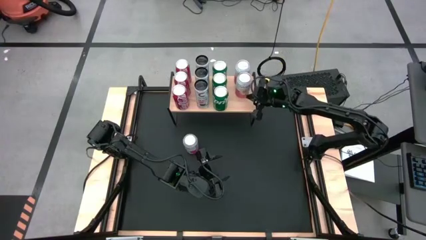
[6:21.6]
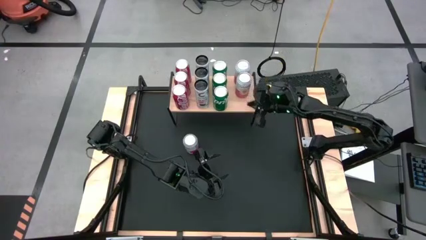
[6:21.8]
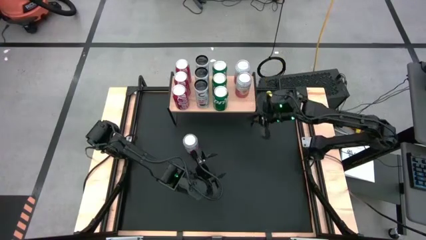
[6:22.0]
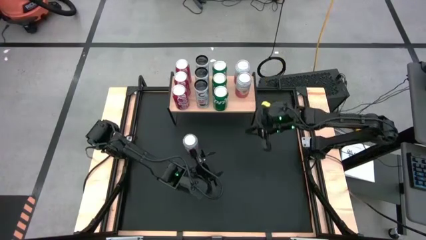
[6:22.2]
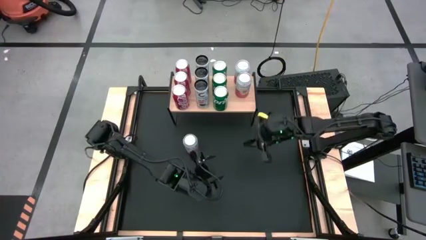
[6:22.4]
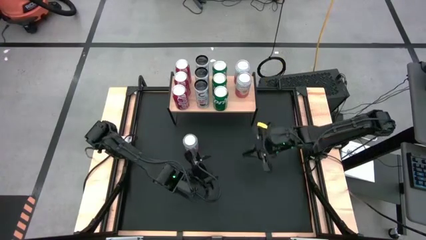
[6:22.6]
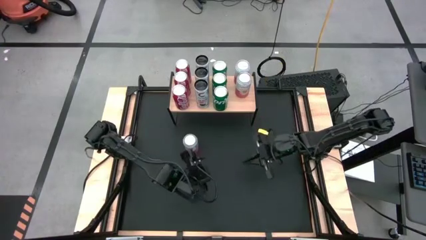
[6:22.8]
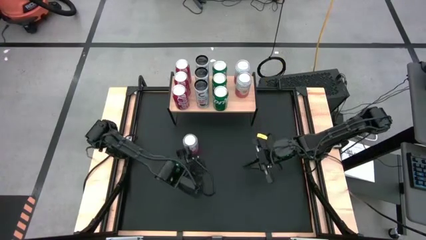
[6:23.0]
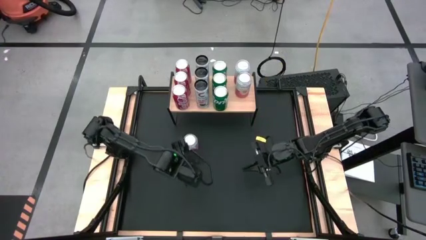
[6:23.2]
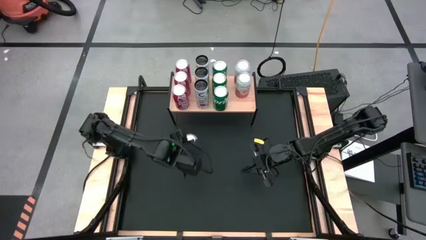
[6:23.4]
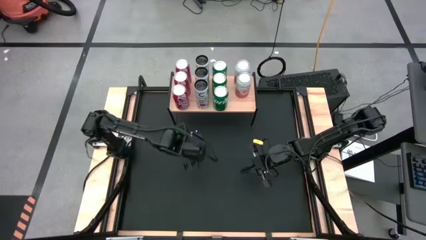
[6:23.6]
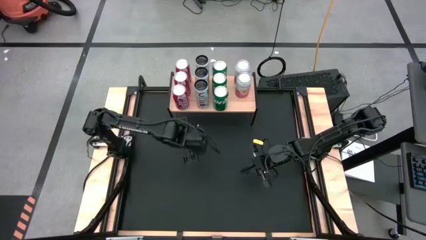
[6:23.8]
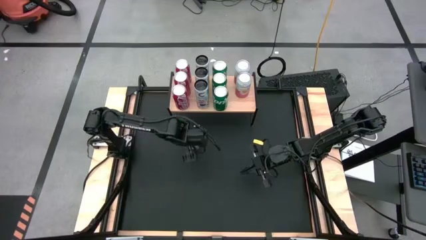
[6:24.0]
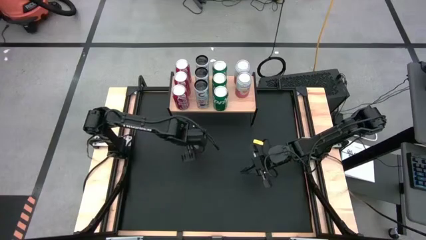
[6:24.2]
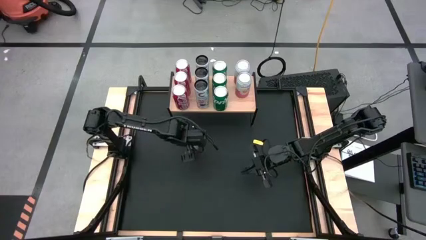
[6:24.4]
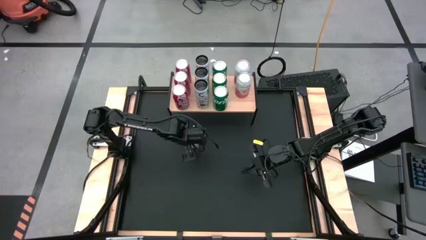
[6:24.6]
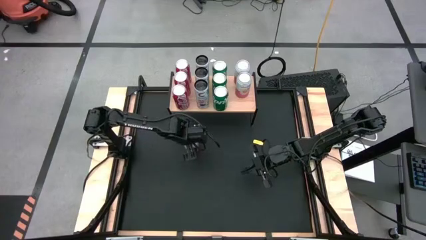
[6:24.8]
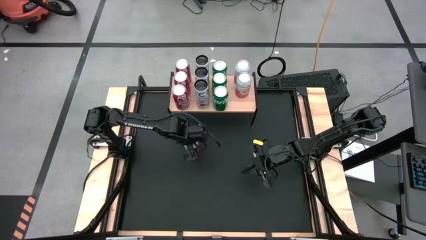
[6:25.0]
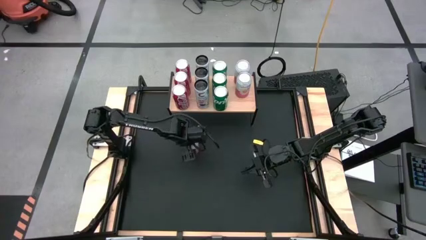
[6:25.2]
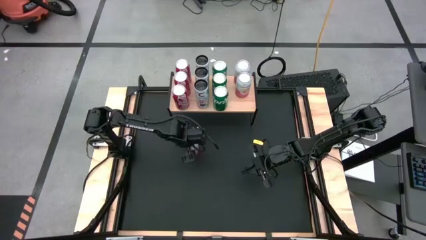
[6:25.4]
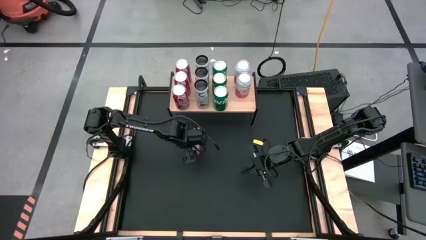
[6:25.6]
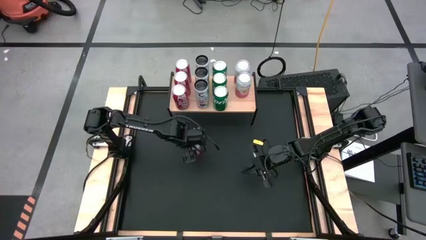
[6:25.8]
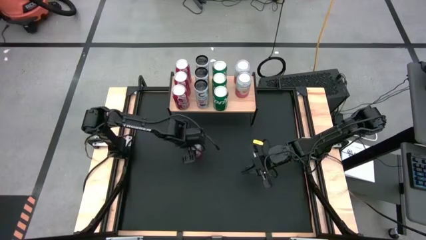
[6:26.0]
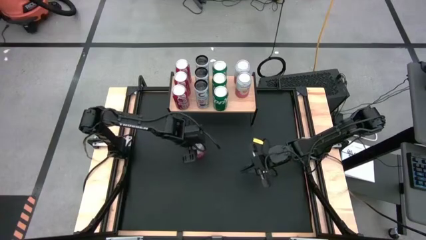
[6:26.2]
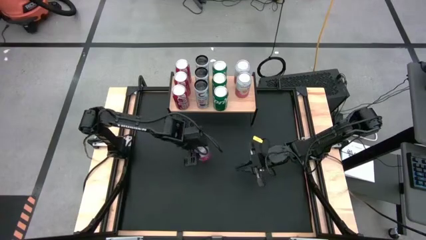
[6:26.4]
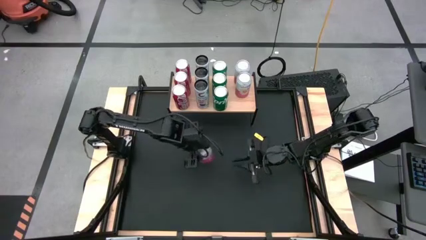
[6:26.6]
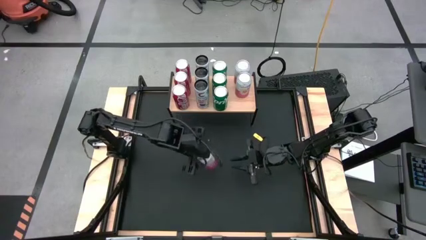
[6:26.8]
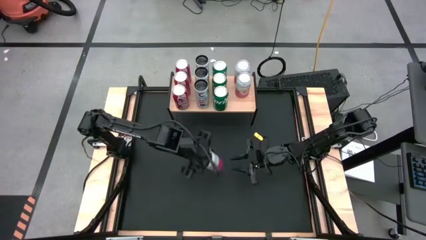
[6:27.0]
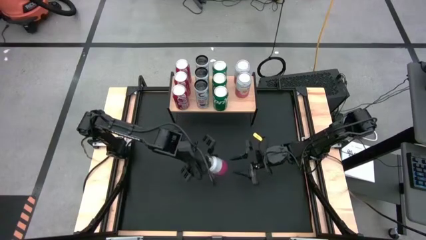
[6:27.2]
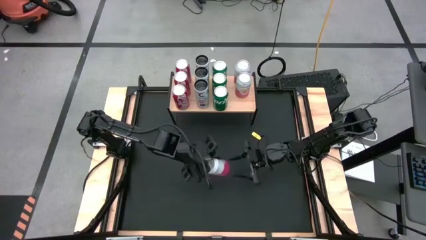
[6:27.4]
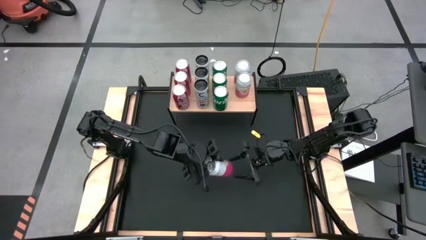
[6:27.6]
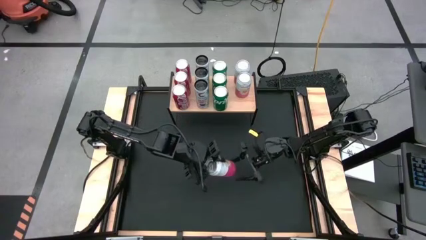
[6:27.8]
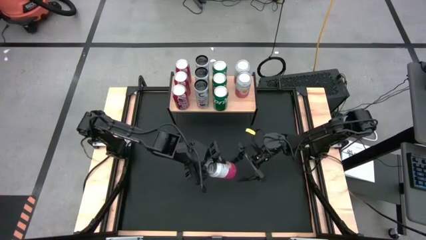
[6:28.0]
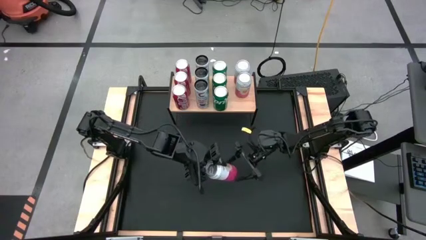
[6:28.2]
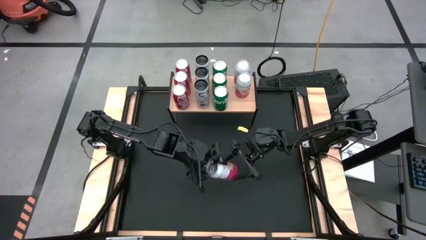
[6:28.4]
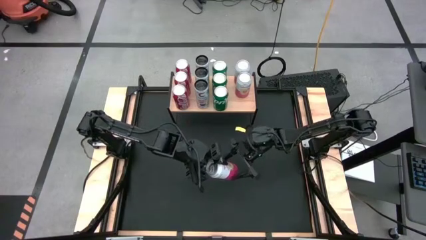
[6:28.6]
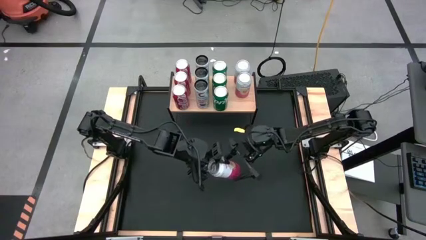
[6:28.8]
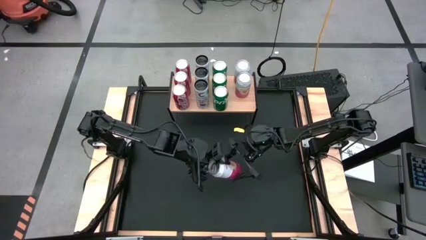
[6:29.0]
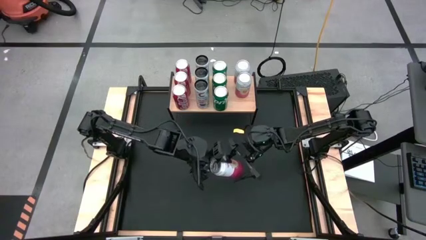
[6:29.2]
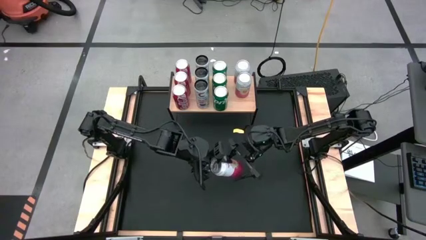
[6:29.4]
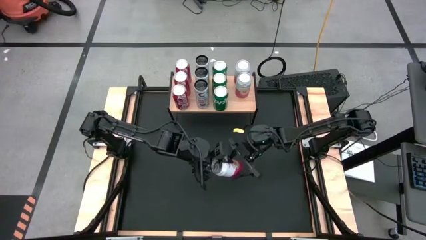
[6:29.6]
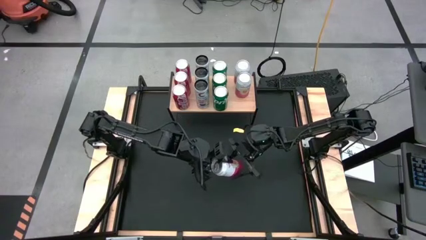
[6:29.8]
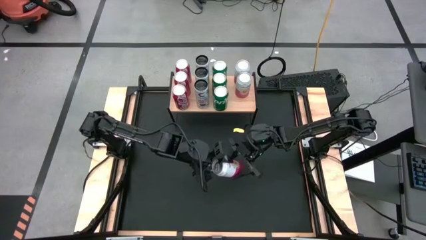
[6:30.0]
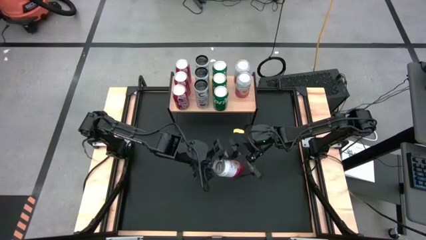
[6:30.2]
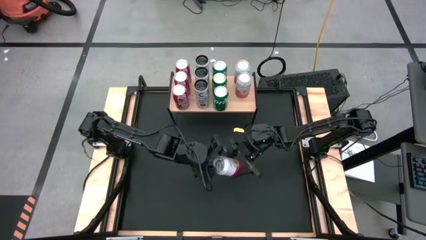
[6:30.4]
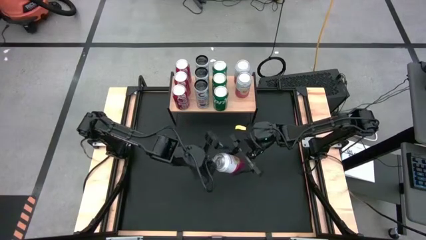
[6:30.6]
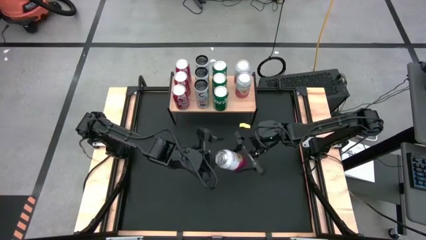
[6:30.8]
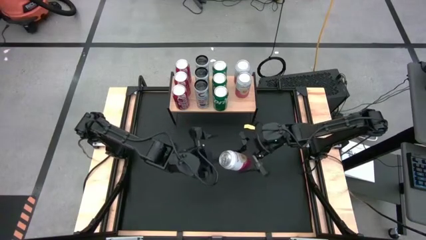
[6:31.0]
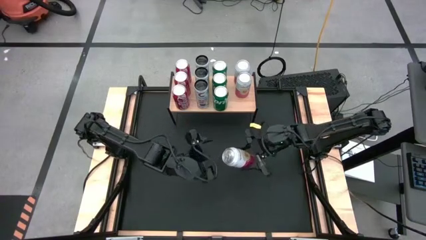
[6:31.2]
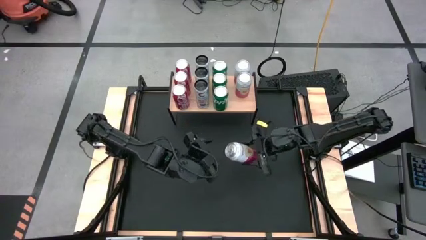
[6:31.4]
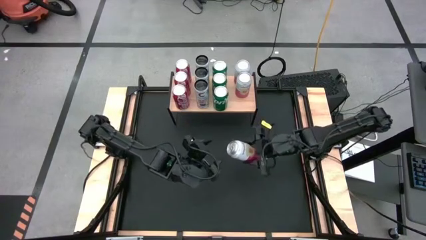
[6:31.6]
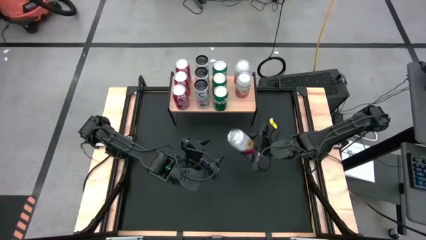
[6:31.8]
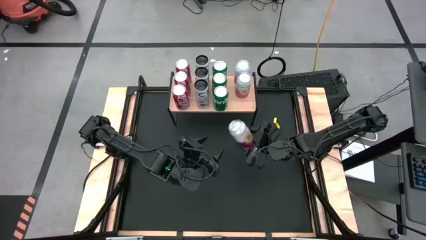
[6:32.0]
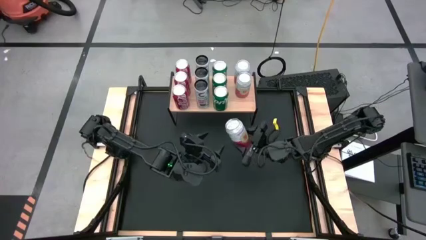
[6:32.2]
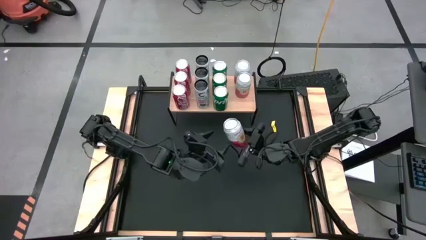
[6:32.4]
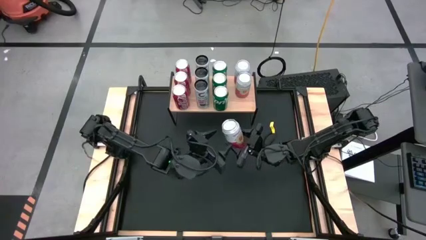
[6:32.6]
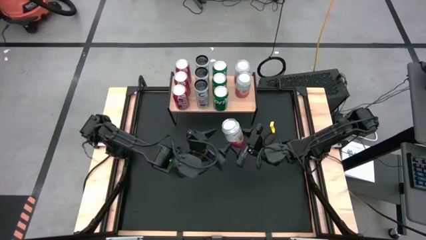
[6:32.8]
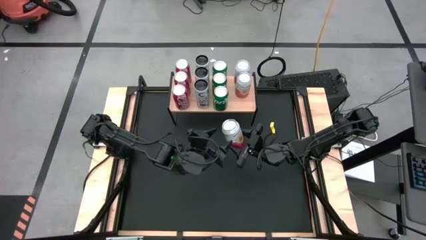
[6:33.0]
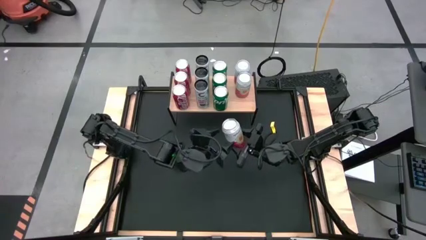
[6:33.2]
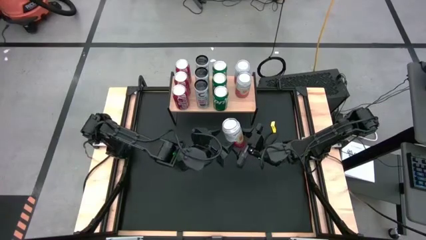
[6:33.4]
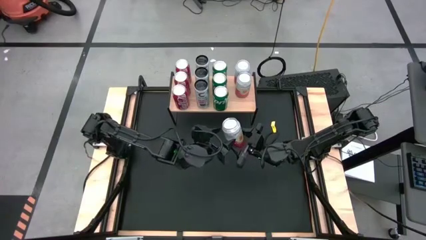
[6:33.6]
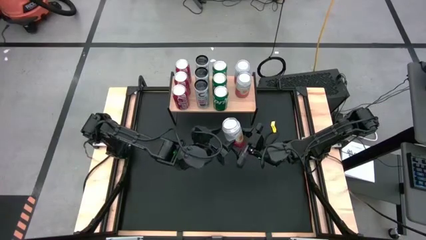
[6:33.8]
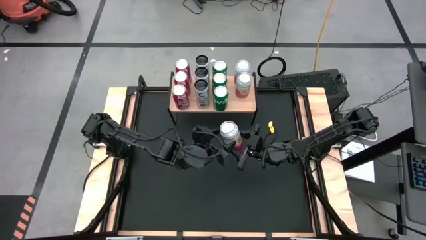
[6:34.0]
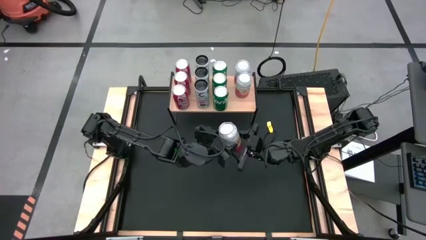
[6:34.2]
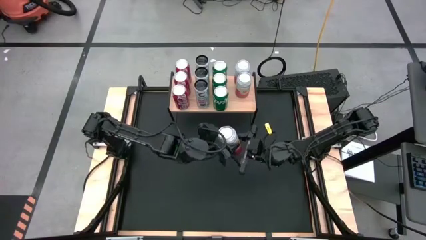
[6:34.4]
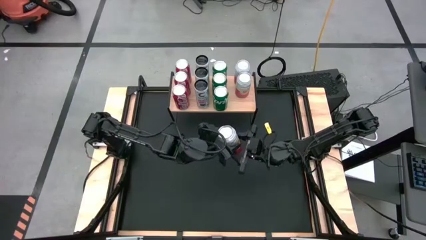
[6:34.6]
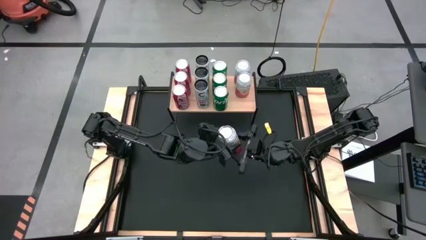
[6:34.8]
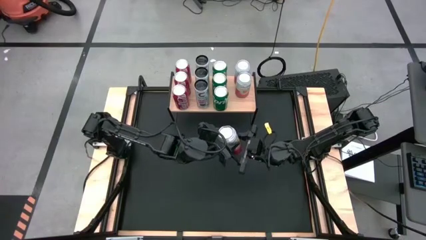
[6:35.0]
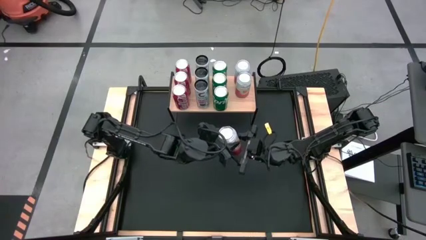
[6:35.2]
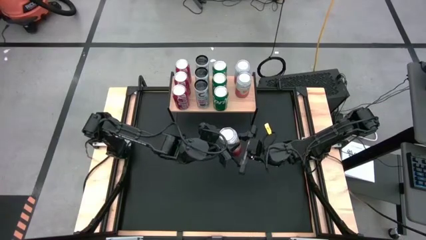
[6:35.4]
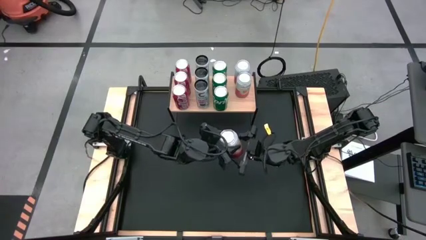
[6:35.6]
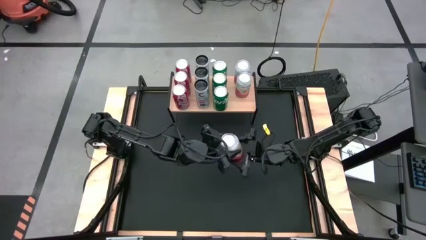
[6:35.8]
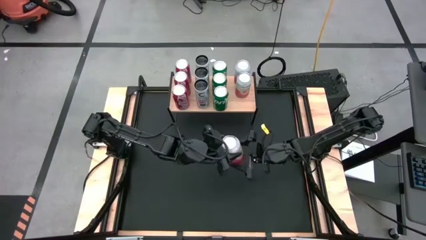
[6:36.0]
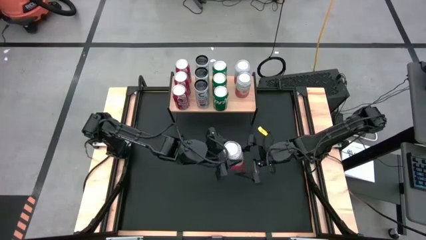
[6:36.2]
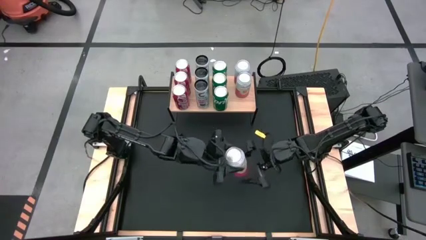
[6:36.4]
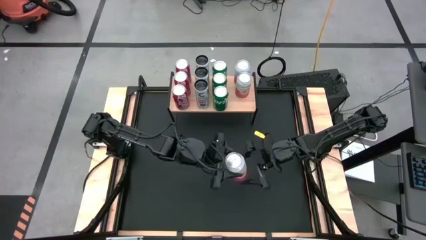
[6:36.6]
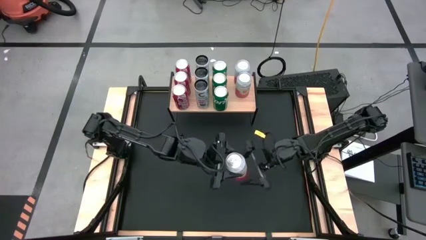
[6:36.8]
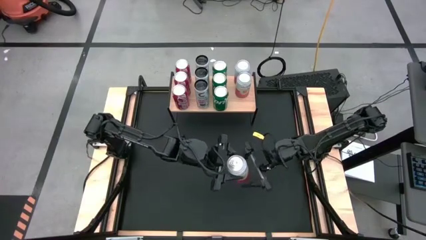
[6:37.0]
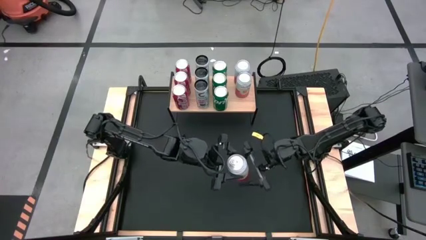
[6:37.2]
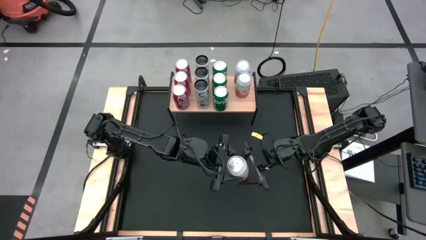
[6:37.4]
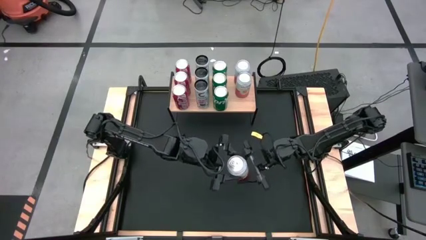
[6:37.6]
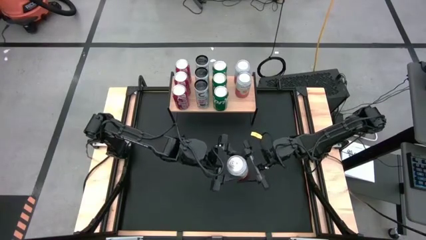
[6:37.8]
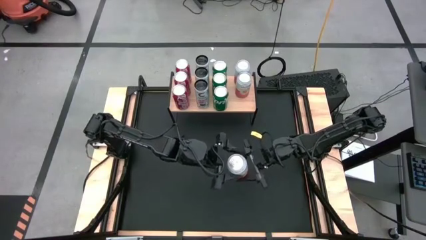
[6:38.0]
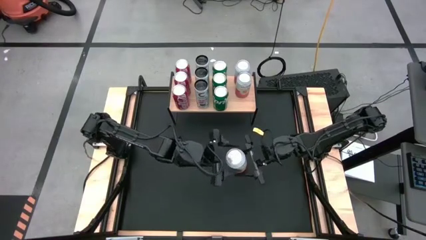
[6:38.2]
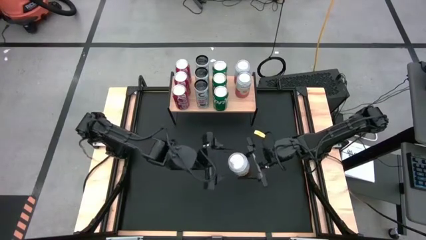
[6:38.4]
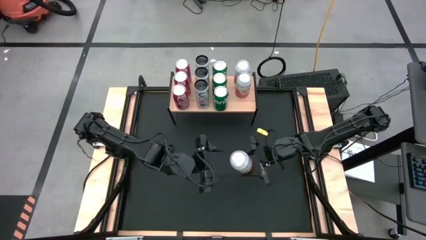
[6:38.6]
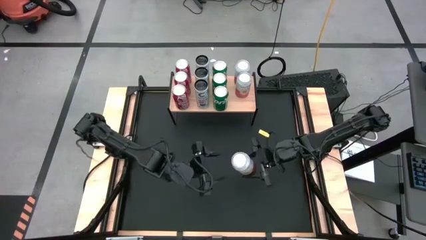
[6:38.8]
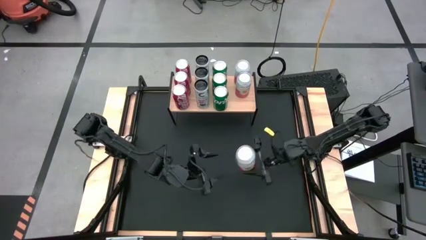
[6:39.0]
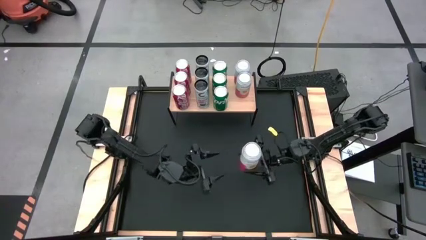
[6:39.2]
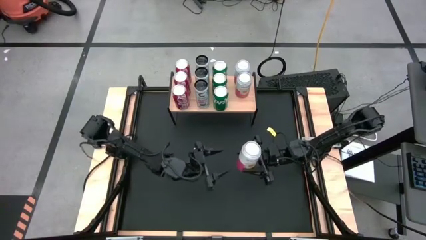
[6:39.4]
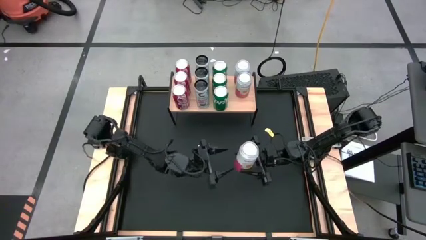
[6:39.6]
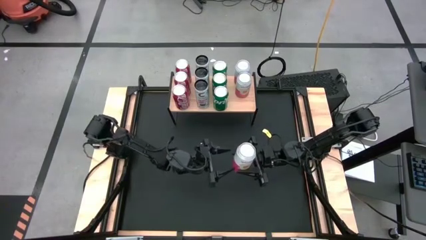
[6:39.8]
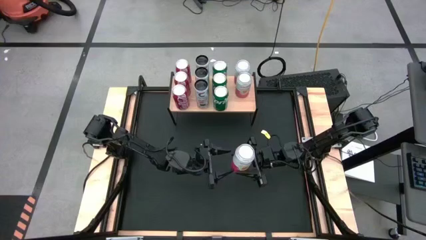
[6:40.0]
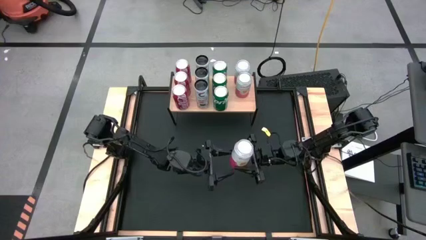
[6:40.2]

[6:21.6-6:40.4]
Task: Place canned beverage on shelf
Put the pink soda can aligned with the other pink soda can on the shelf
